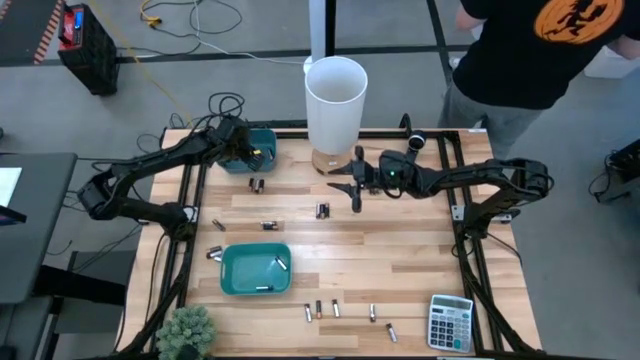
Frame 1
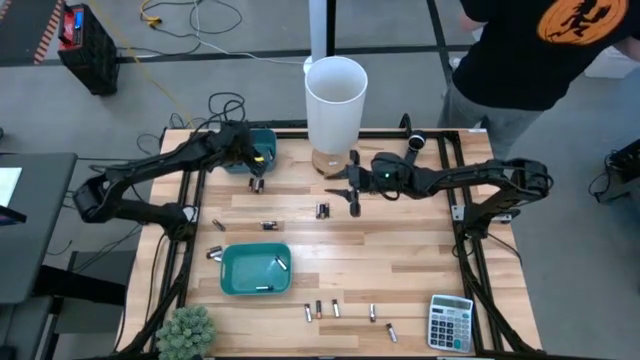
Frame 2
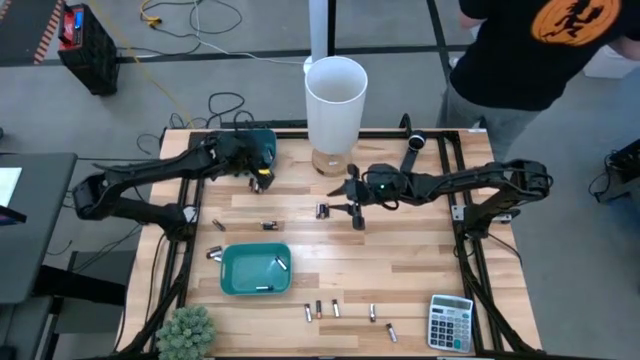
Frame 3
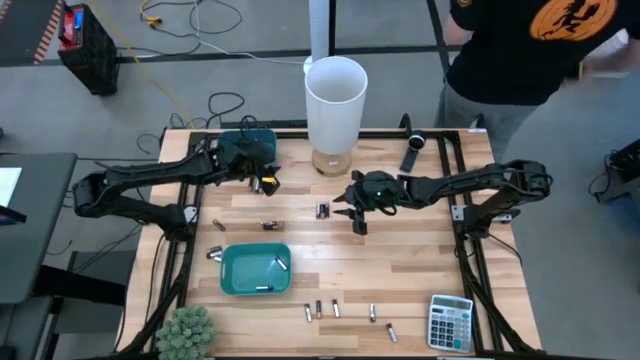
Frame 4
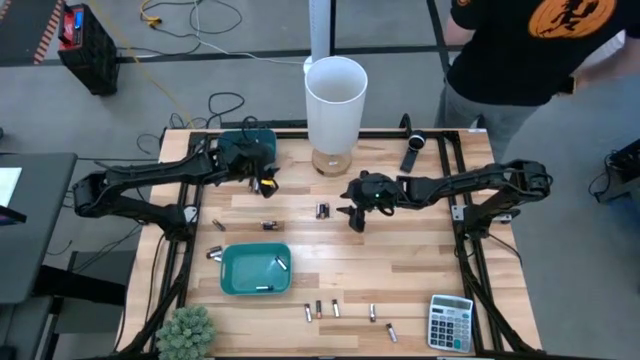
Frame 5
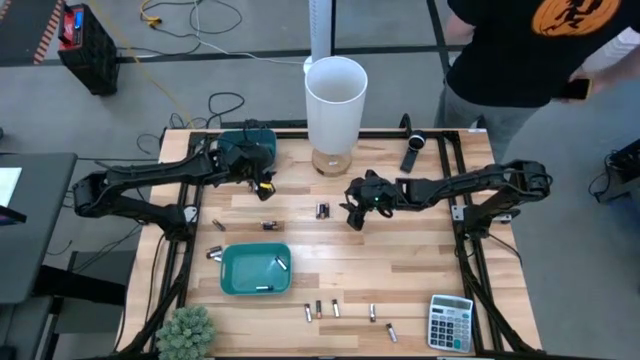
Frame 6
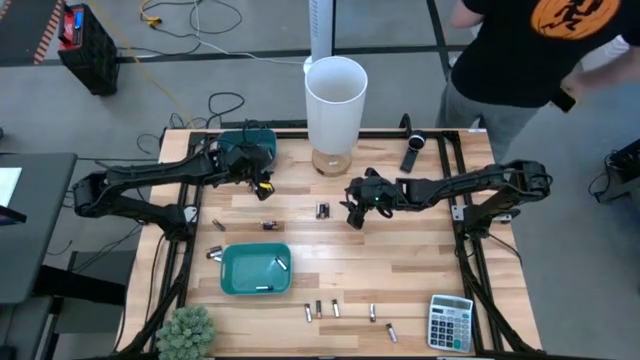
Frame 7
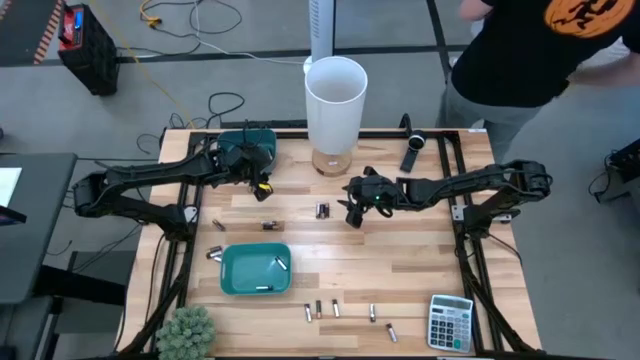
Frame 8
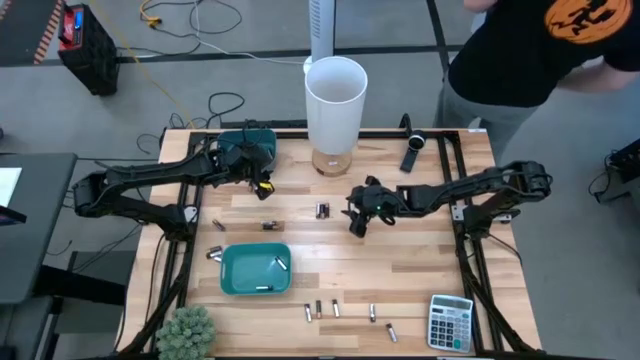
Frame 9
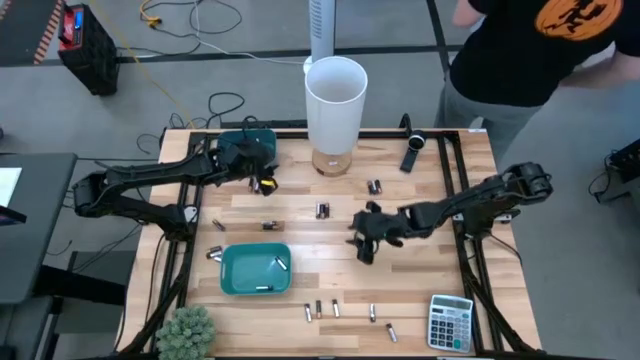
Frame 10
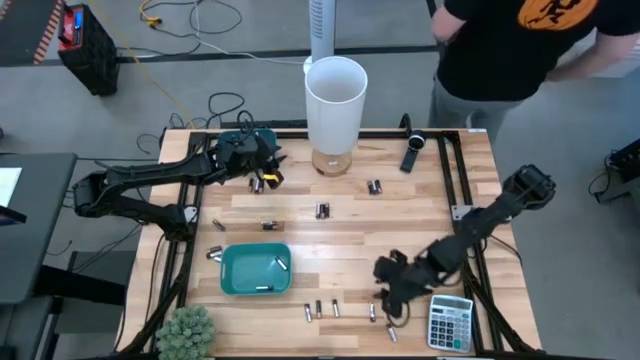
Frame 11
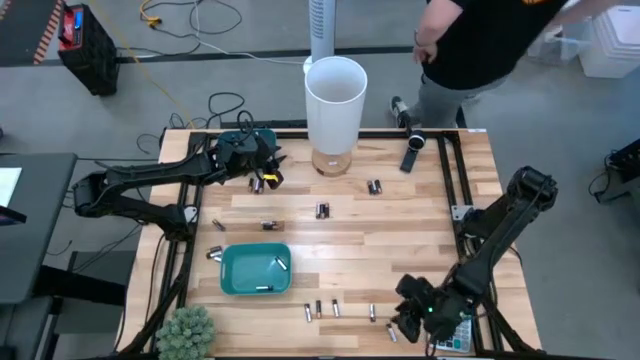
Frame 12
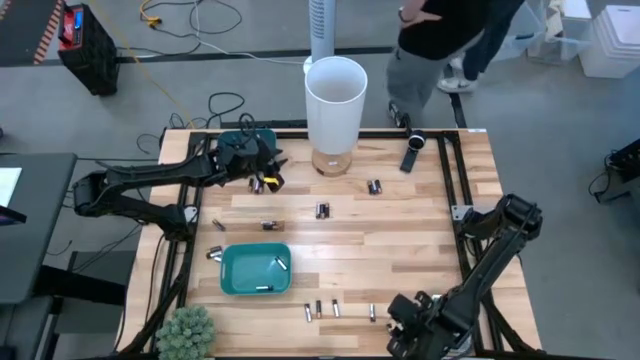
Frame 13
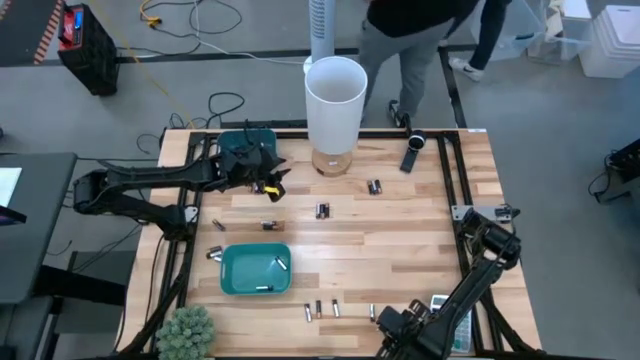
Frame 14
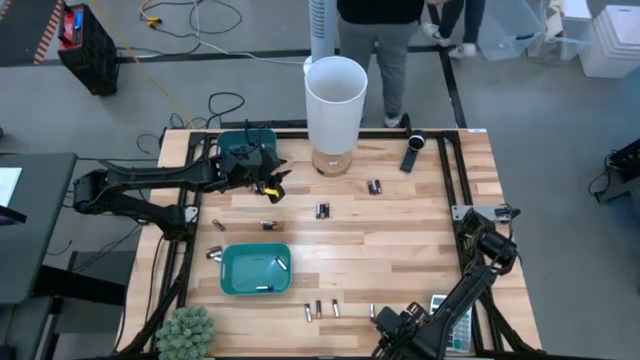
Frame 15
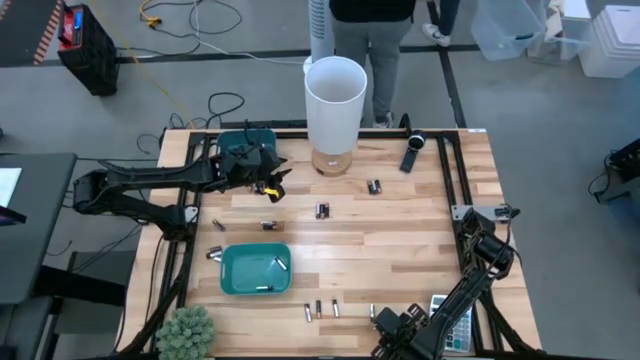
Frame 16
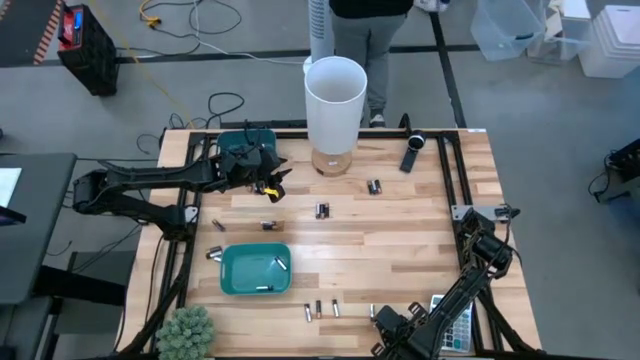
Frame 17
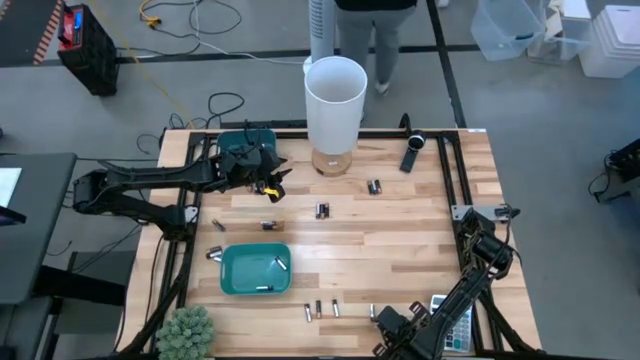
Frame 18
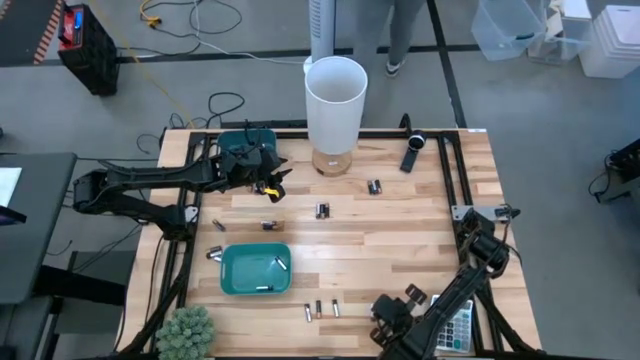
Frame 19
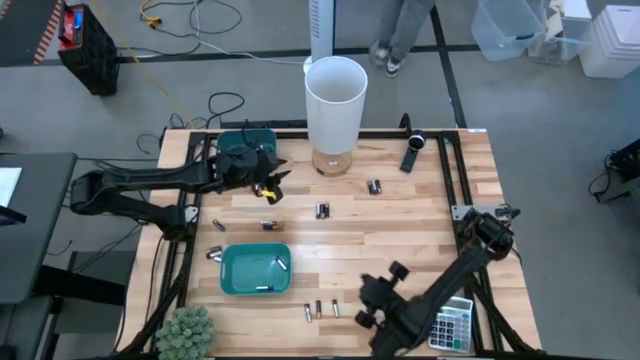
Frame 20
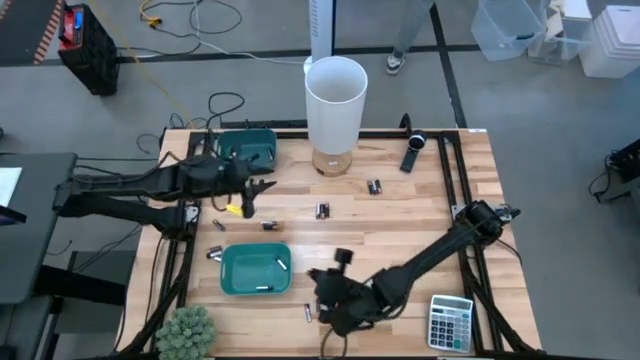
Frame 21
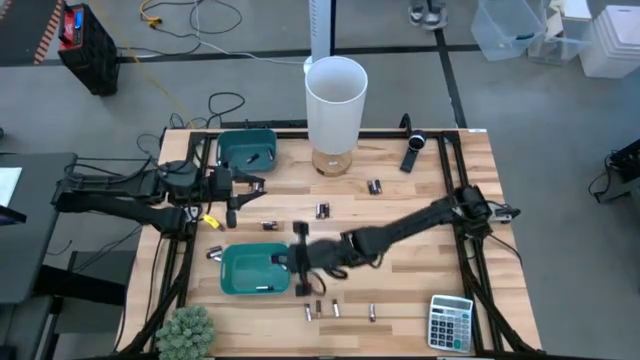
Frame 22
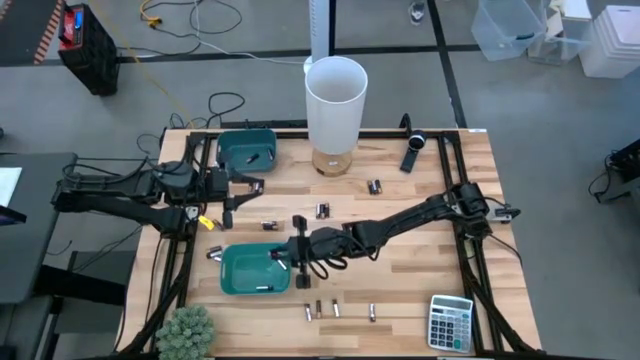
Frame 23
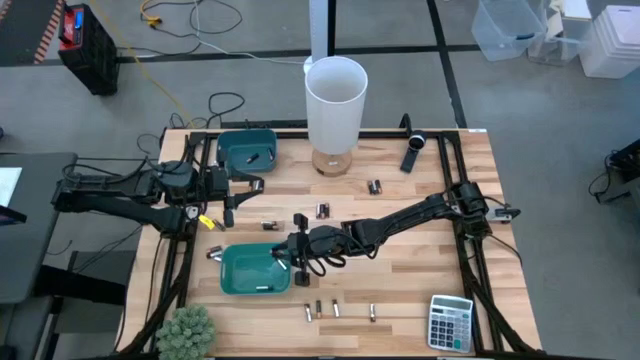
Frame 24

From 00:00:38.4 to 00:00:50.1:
Task: Sort batteries
Put the silver battery into the green bin

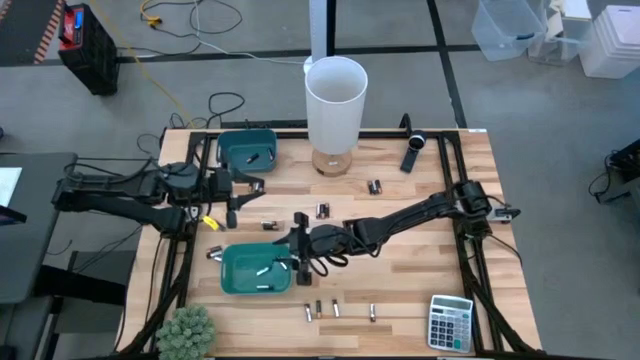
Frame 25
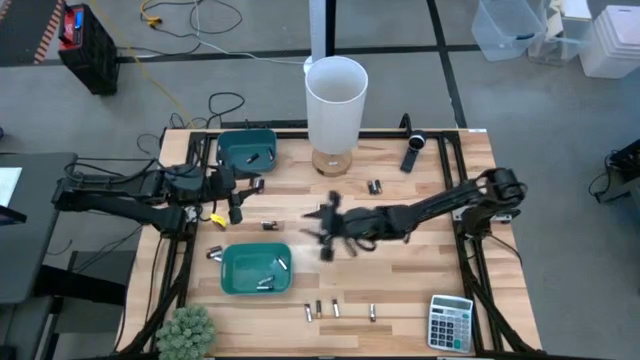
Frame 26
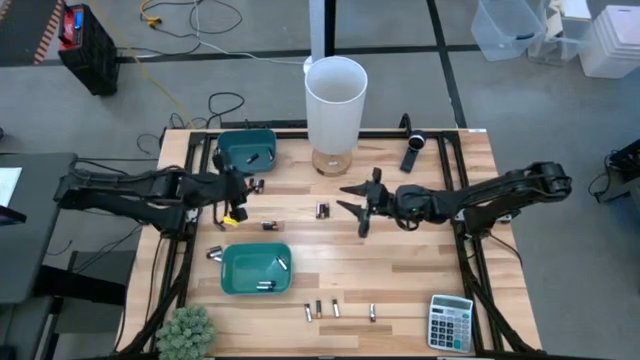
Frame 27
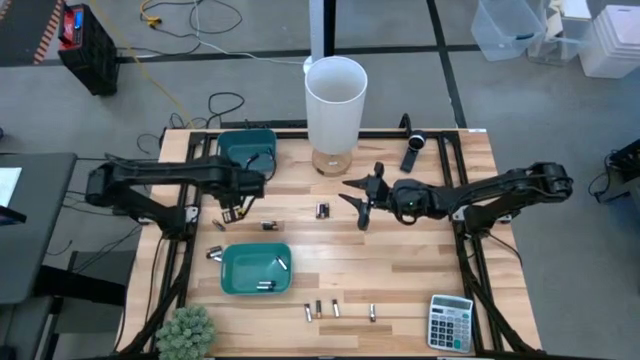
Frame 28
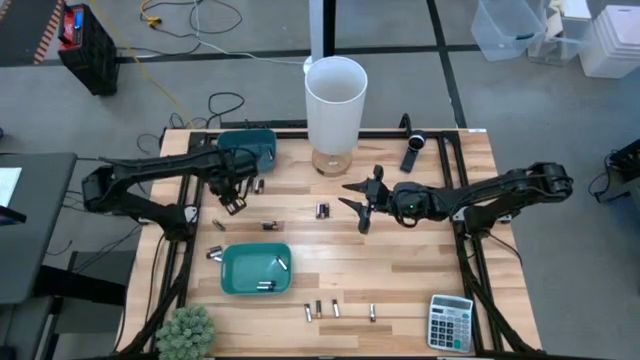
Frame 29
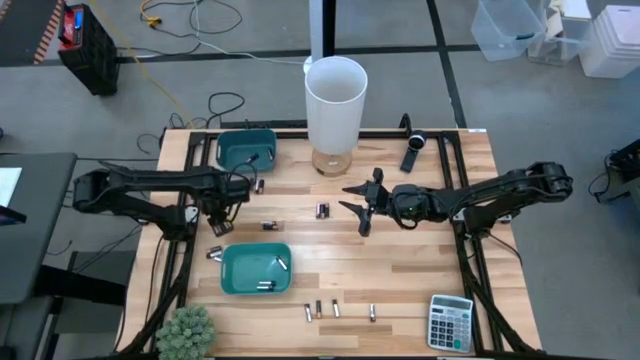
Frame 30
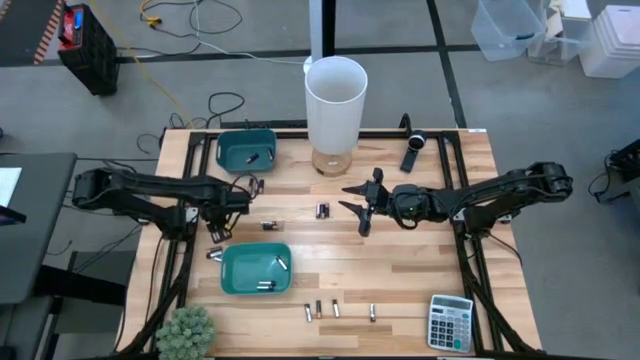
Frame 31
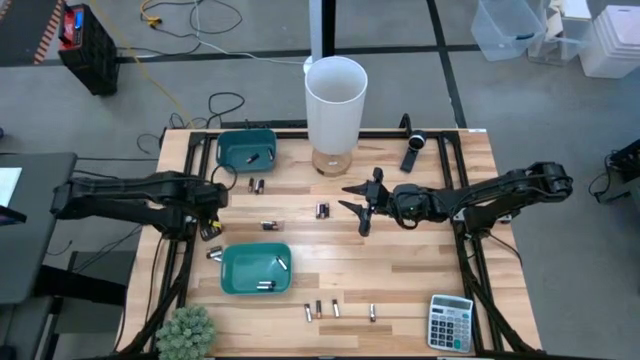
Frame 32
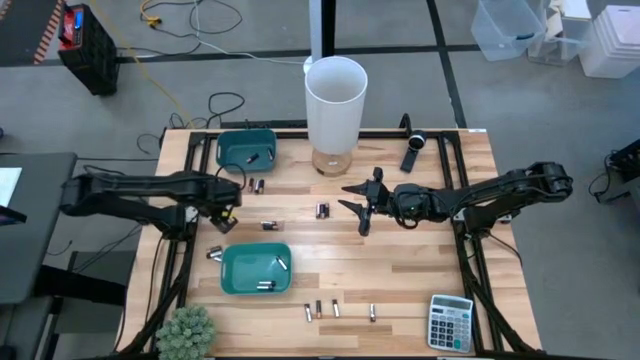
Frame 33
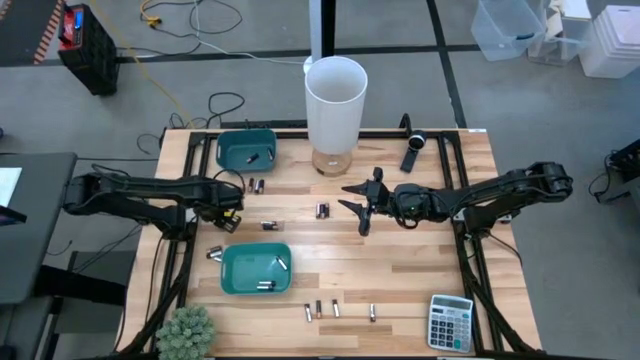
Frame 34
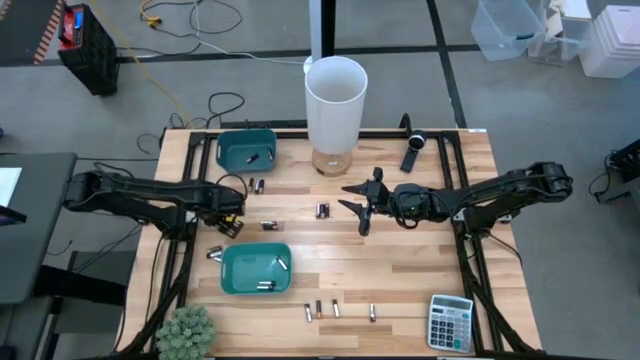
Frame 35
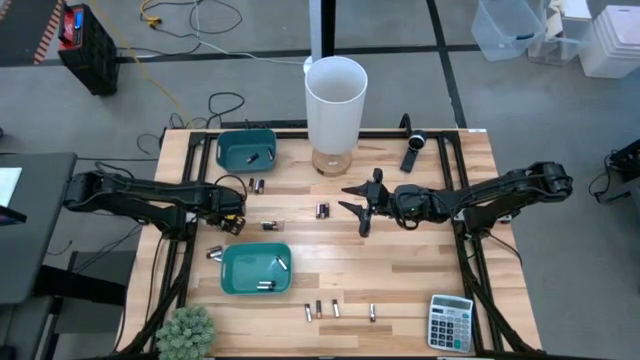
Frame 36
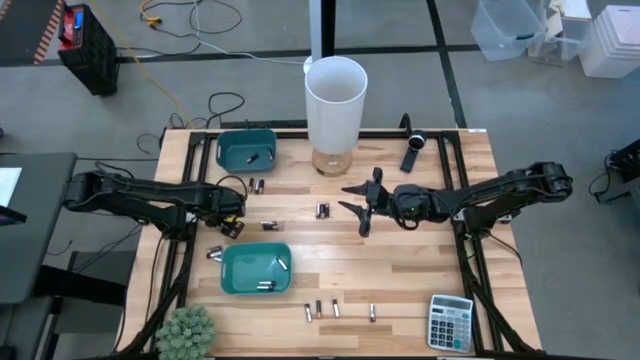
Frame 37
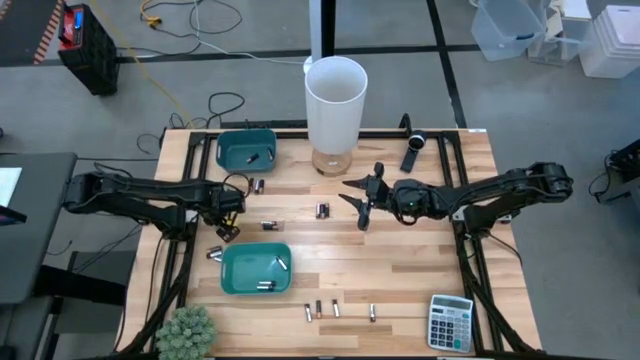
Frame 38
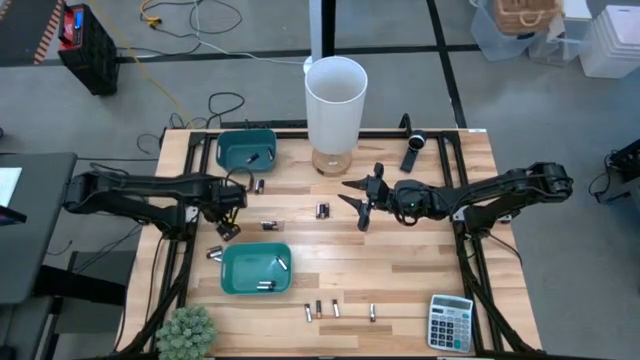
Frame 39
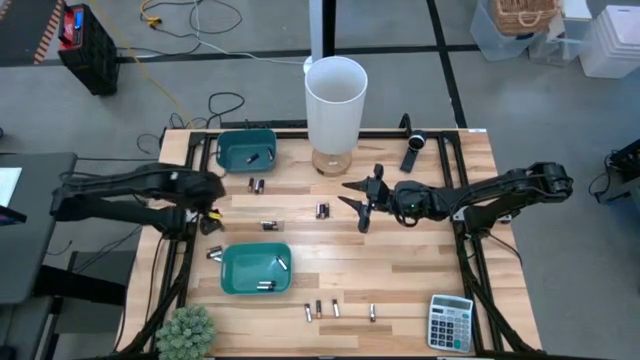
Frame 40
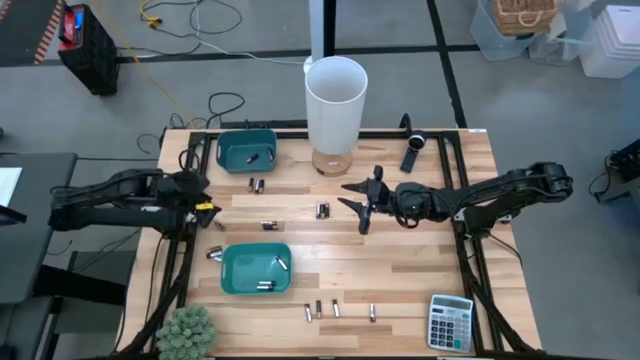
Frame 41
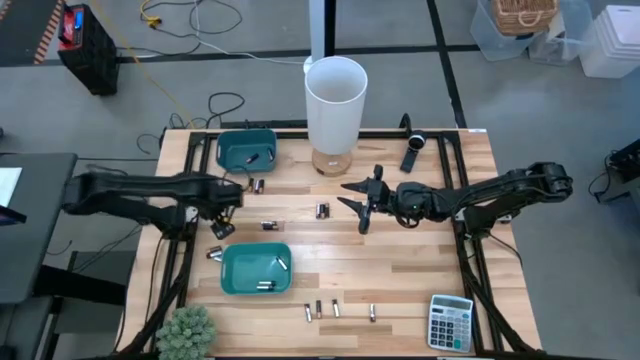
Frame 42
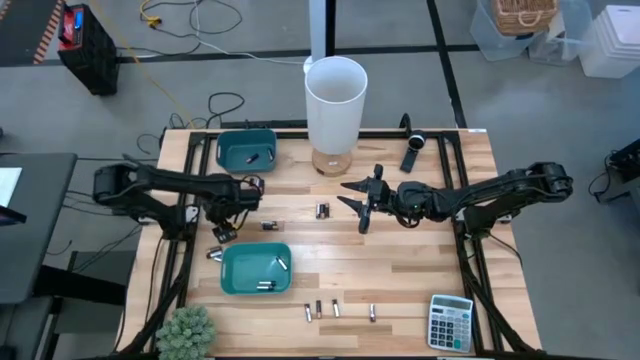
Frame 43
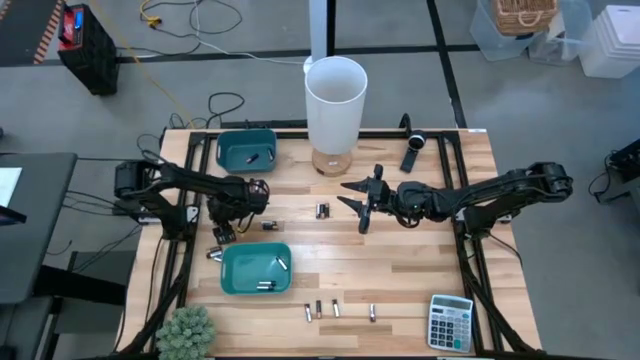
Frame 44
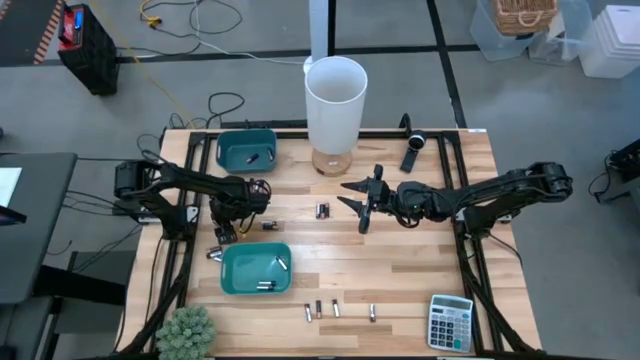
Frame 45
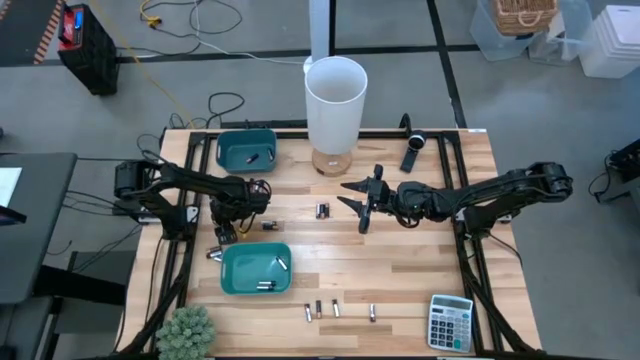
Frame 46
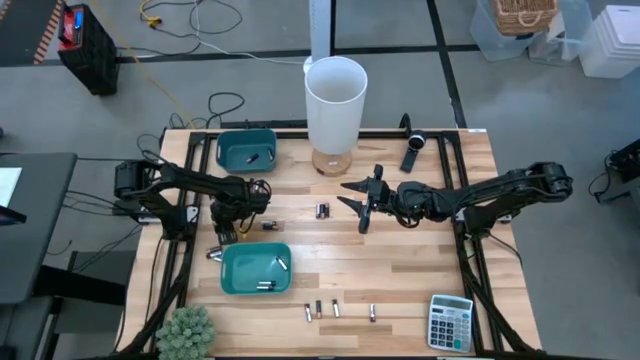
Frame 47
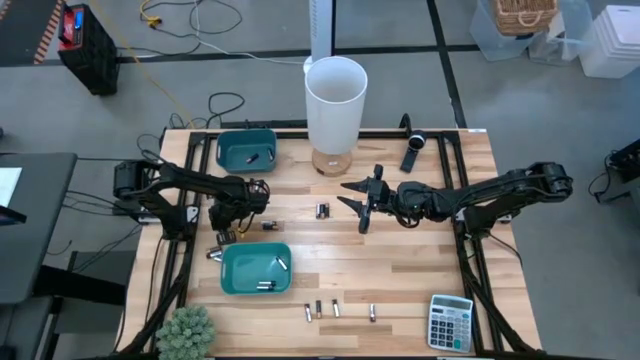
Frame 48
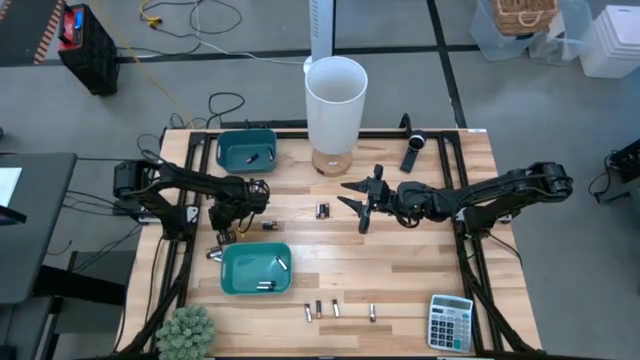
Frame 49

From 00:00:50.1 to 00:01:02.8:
Put the black battery into the blue bin
